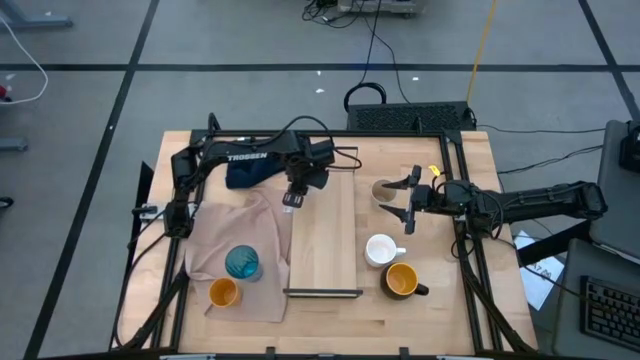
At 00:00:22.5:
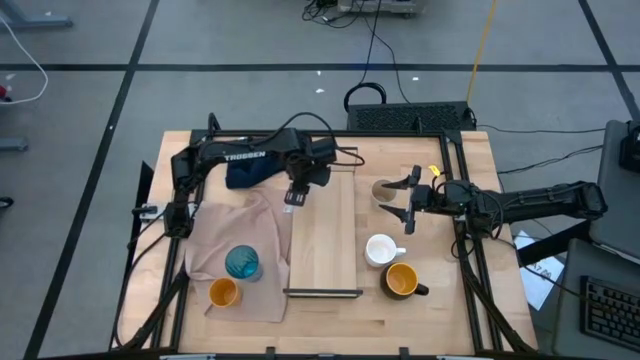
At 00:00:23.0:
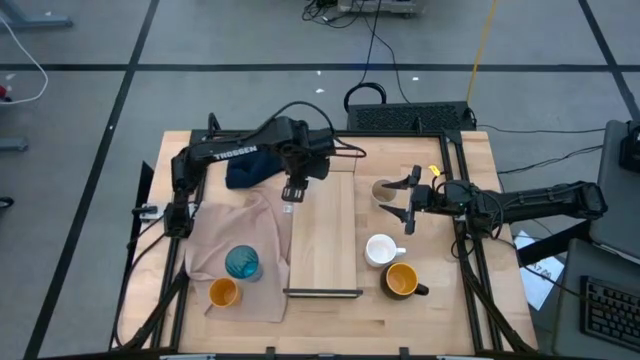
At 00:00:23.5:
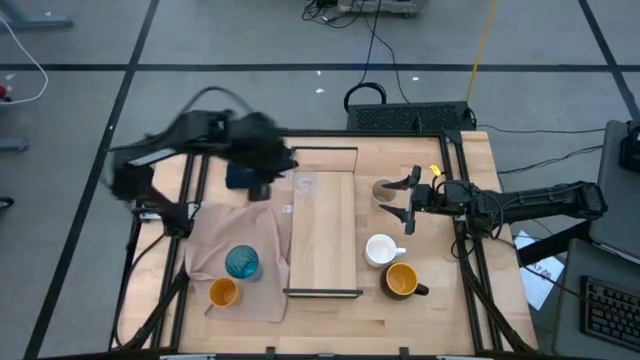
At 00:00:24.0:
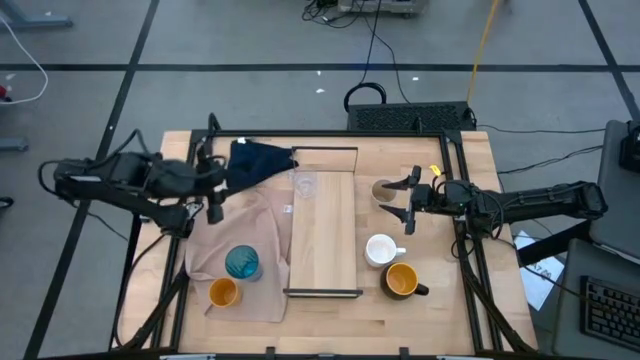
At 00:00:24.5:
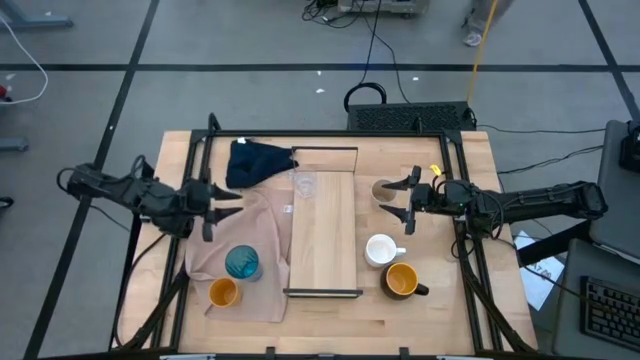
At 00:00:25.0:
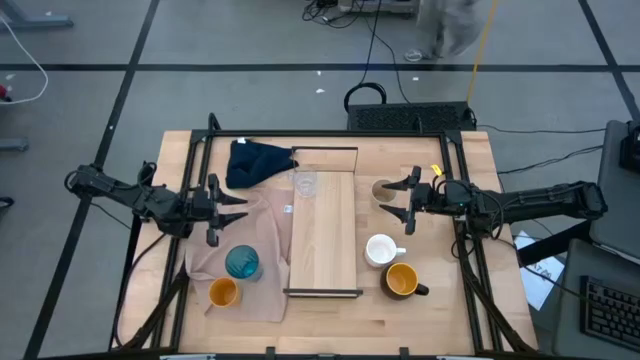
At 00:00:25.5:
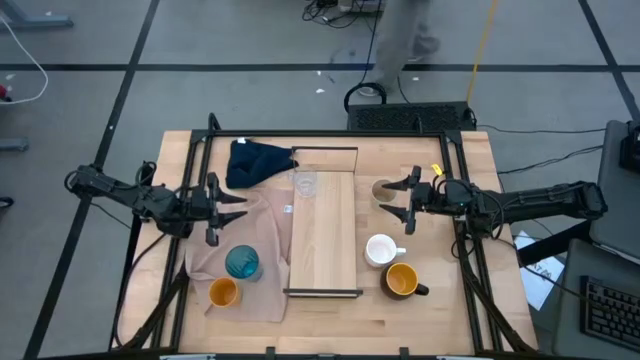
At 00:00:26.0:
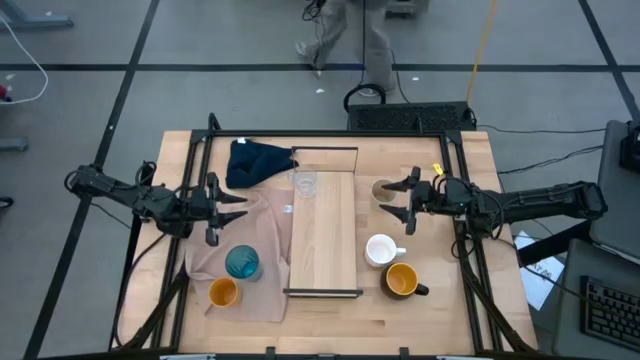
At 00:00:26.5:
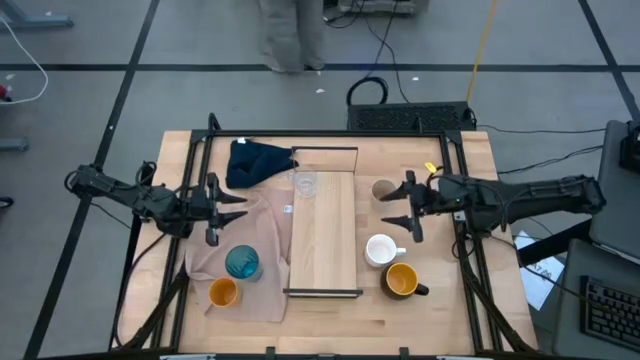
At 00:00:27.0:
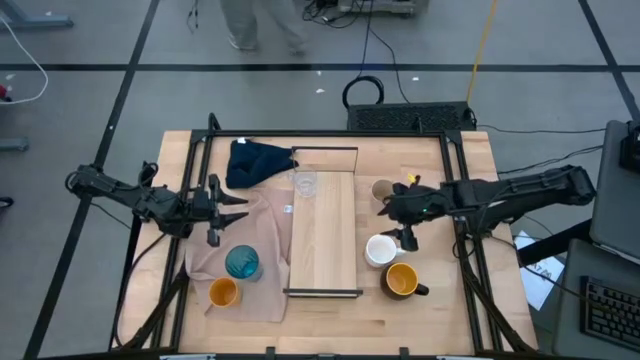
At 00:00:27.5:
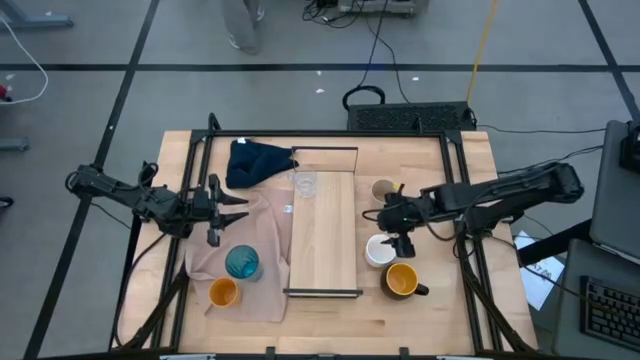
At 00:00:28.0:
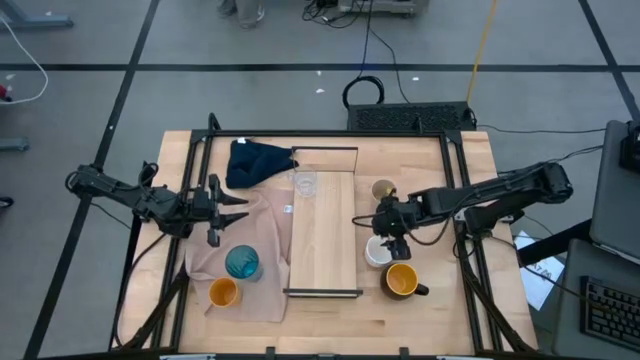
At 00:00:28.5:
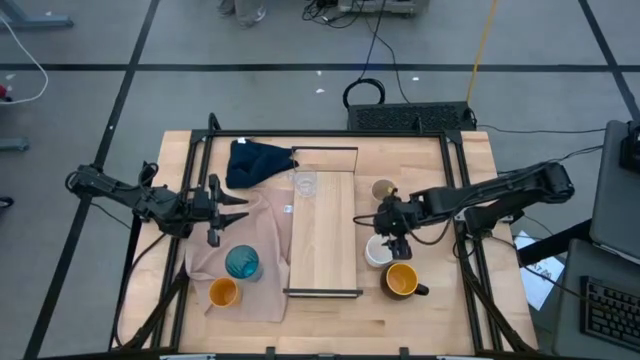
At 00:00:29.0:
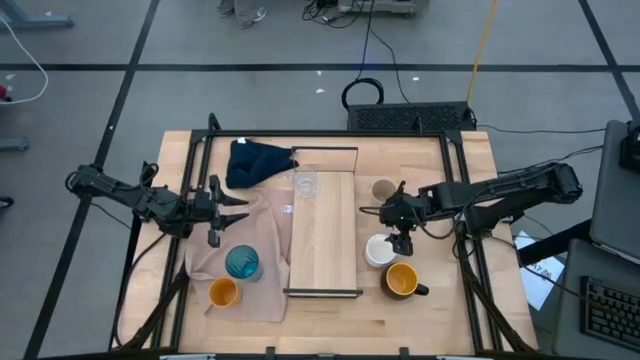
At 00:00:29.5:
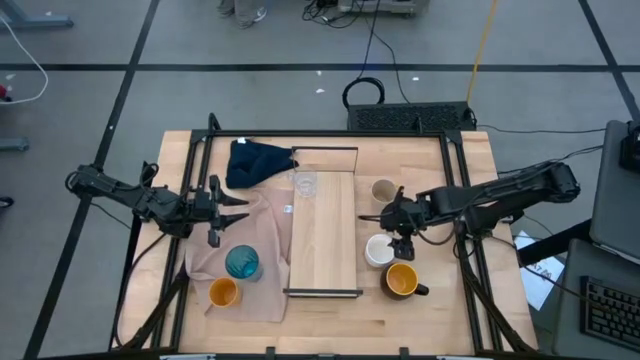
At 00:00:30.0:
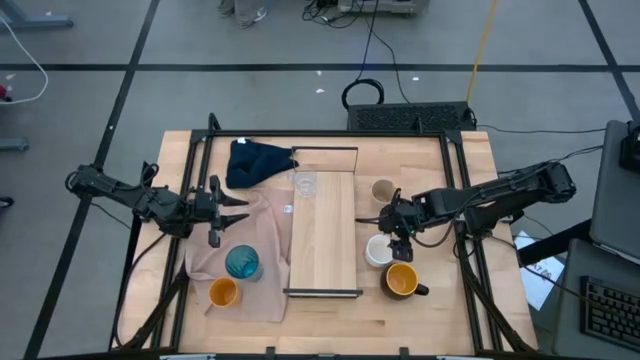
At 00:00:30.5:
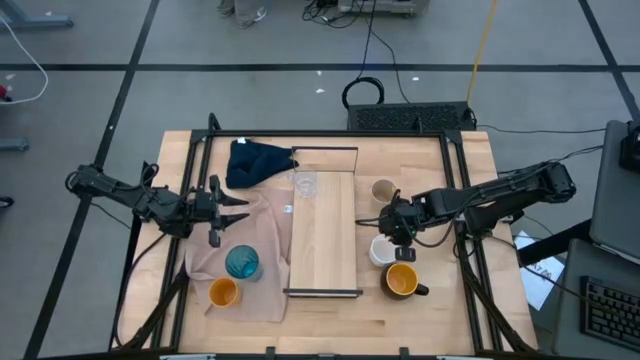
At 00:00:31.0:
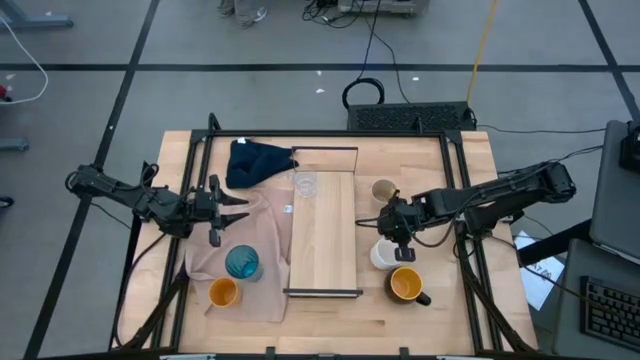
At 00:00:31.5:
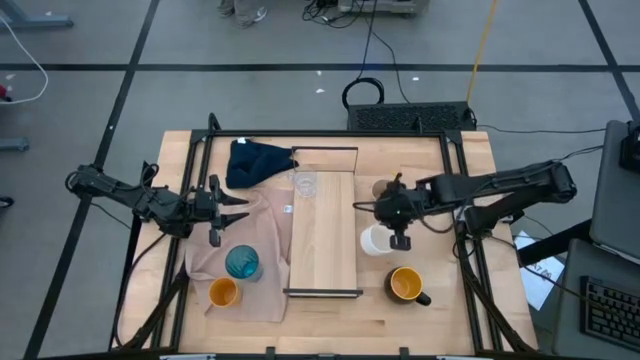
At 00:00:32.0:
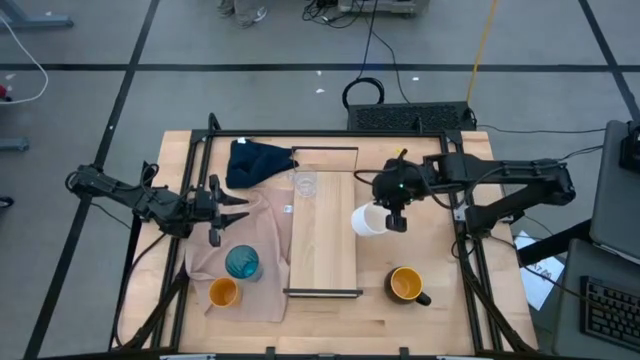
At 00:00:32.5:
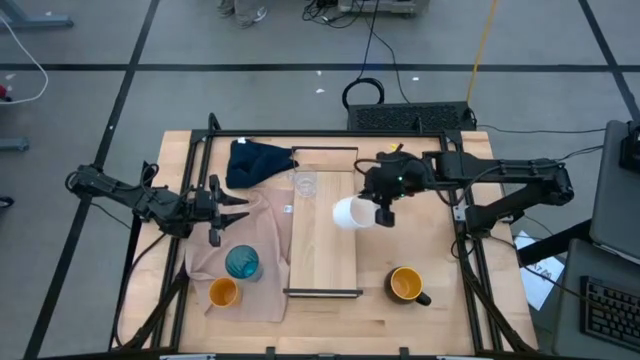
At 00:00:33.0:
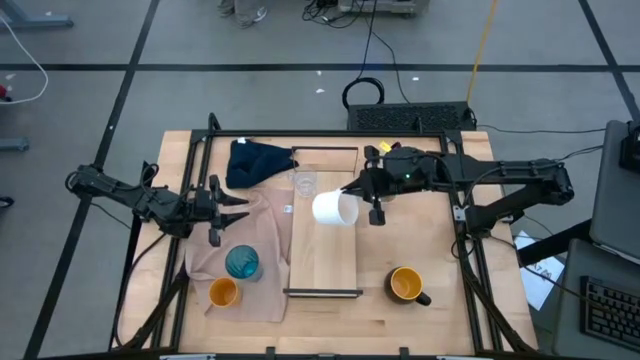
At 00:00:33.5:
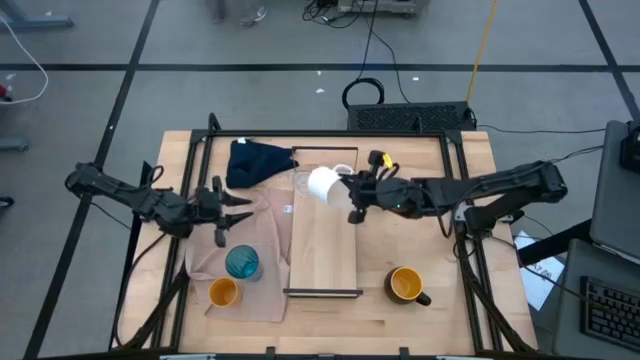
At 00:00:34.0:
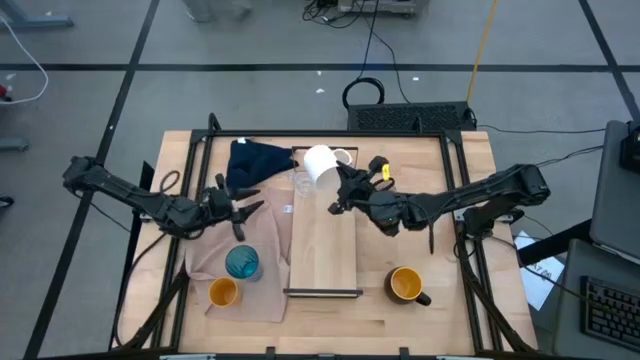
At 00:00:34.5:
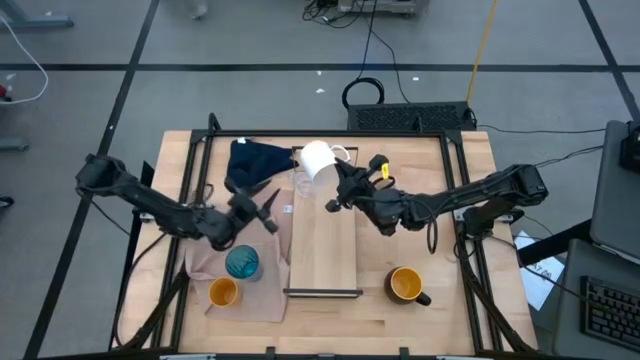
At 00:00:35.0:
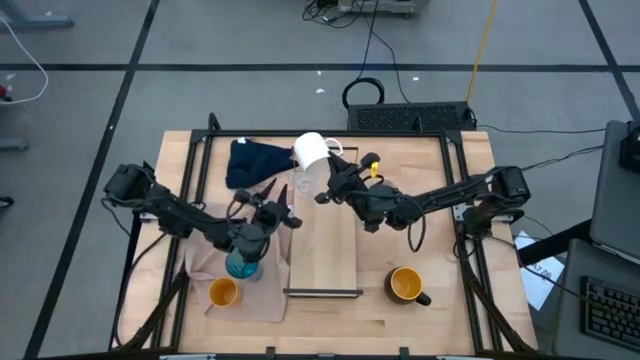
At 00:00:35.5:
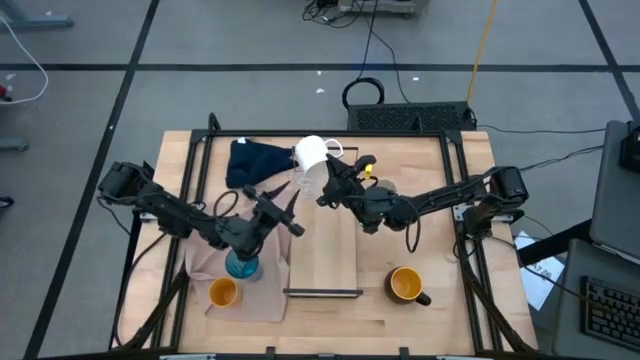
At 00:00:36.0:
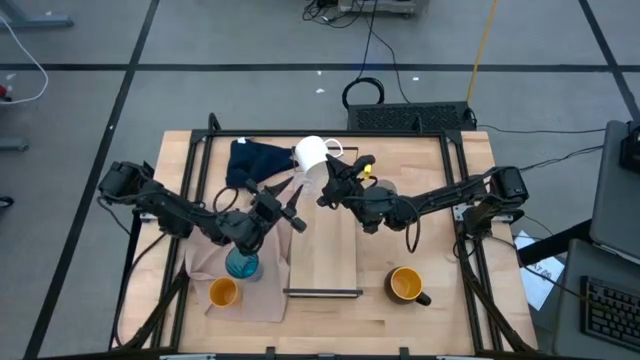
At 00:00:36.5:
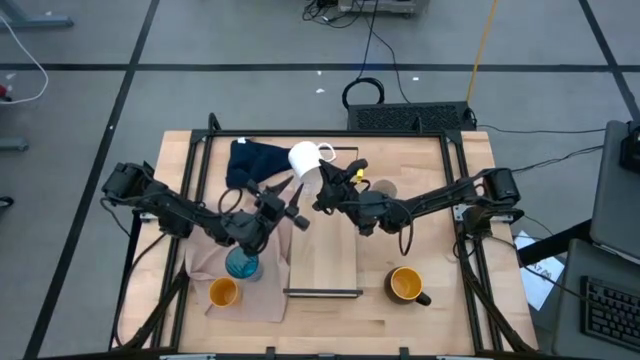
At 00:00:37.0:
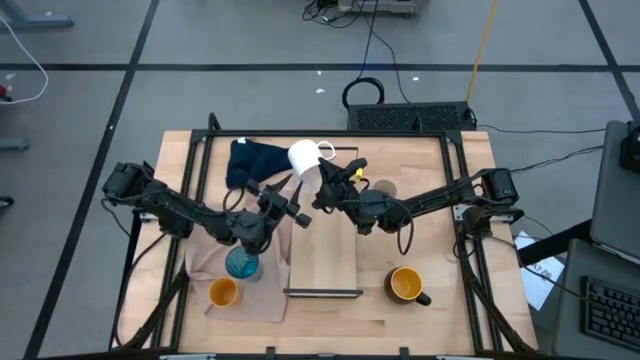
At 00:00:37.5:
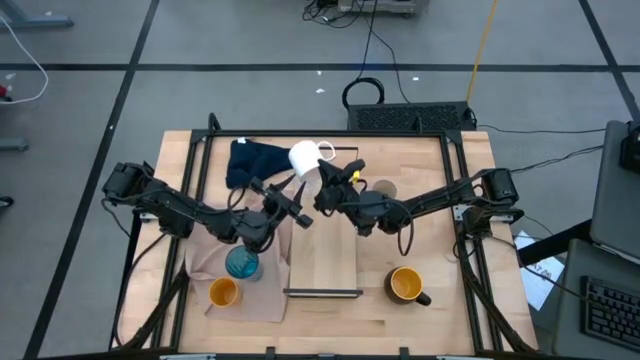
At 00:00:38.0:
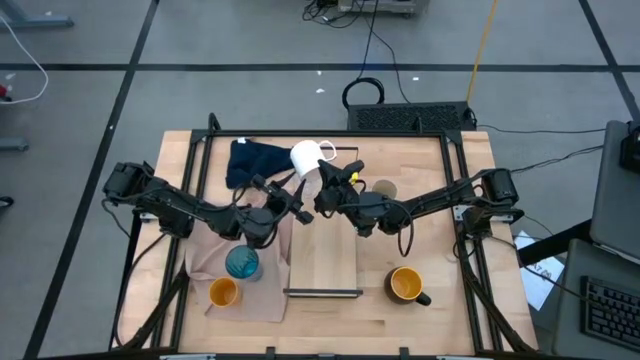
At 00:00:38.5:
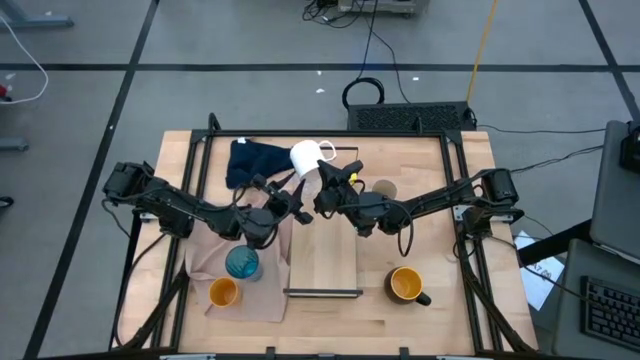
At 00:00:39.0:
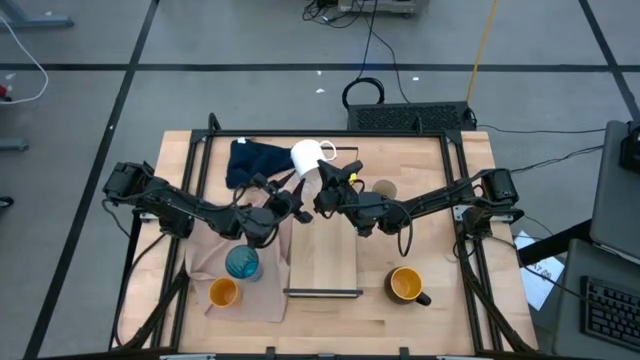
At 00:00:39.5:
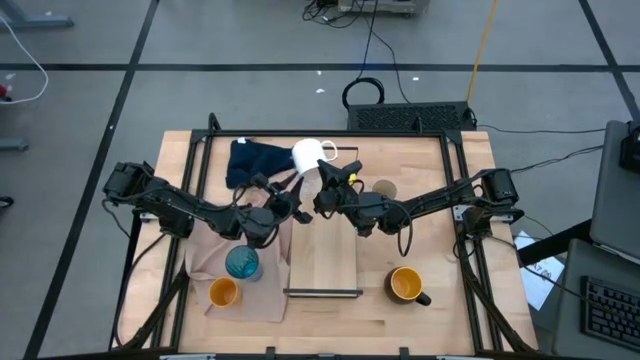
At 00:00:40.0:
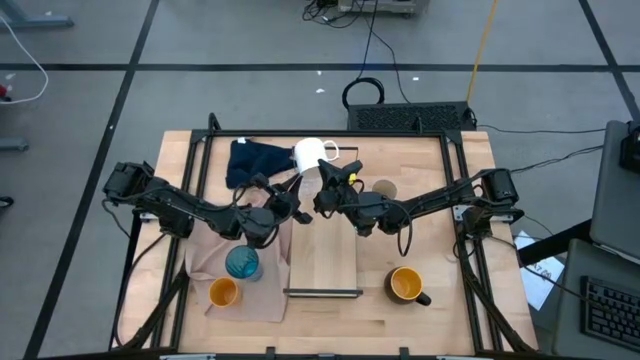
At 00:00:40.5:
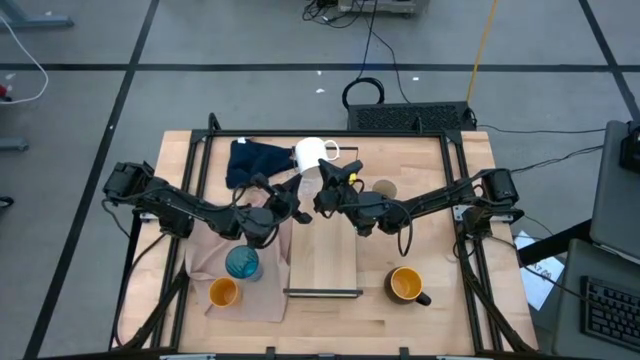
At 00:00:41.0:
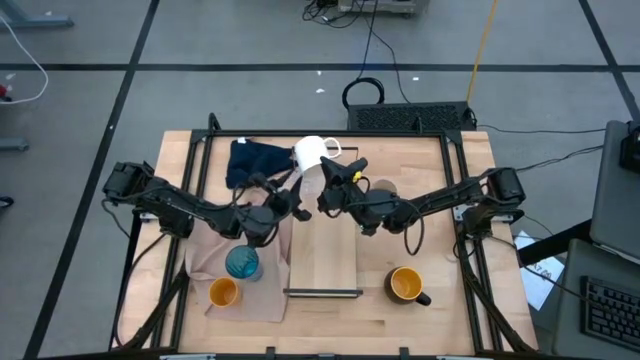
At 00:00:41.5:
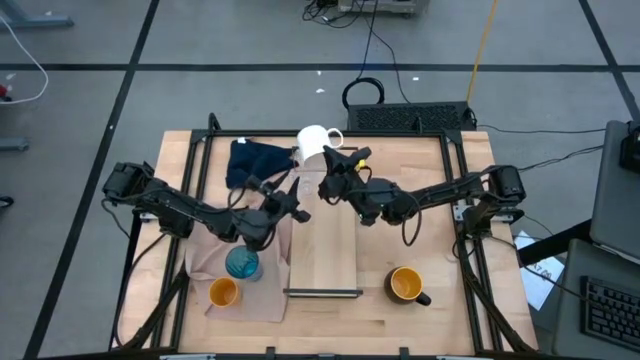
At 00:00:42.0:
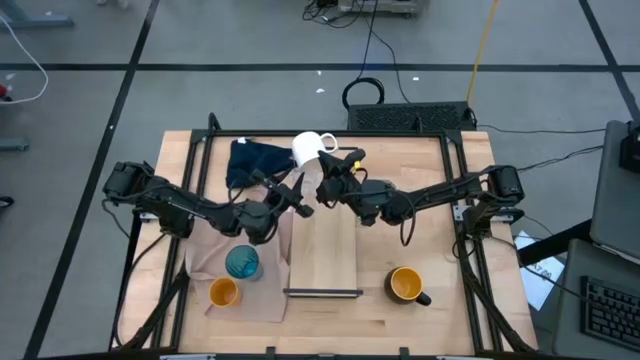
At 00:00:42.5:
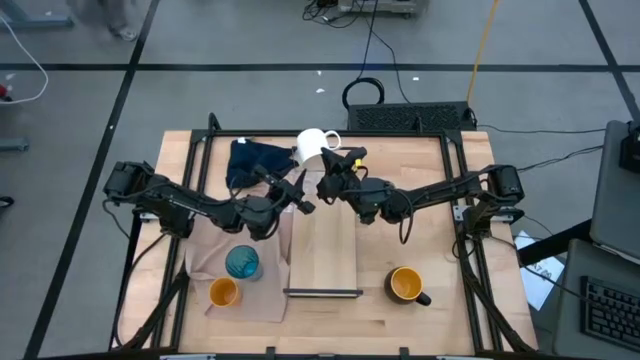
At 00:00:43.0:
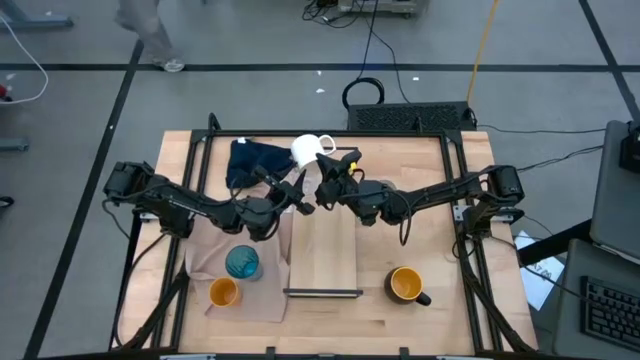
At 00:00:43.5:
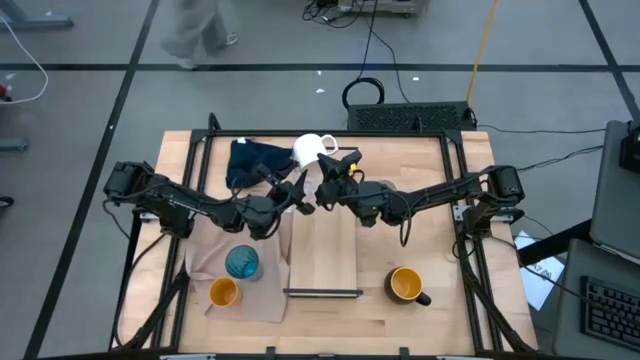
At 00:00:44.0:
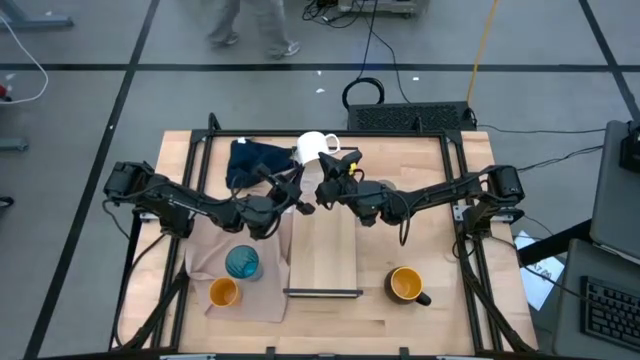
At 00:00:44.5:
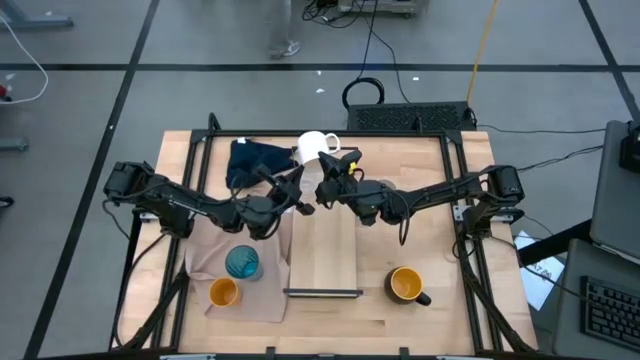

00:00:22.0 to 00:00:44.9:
Task: Stack small to large cups/mugs on shelf
Put the white mug on the shelf
